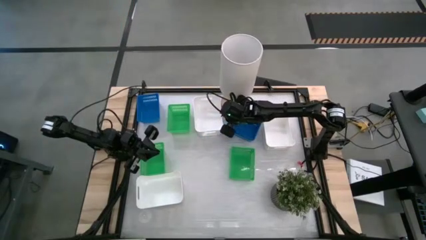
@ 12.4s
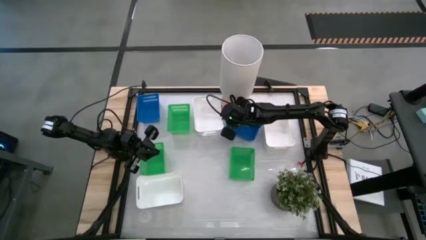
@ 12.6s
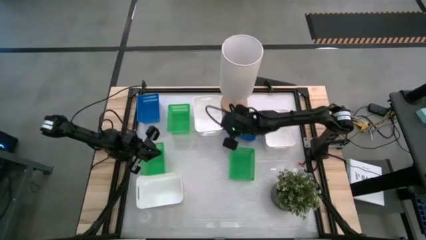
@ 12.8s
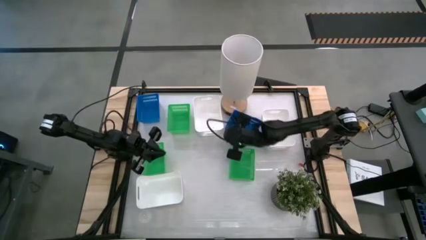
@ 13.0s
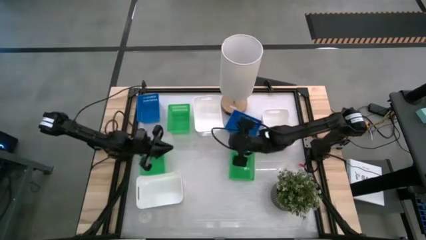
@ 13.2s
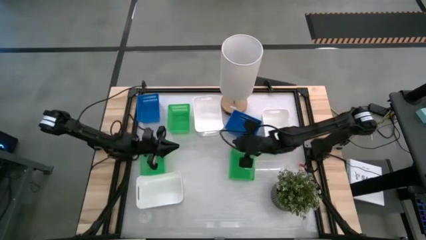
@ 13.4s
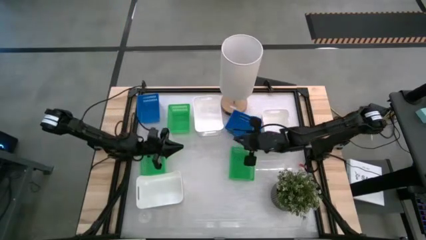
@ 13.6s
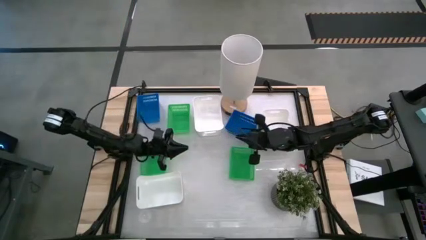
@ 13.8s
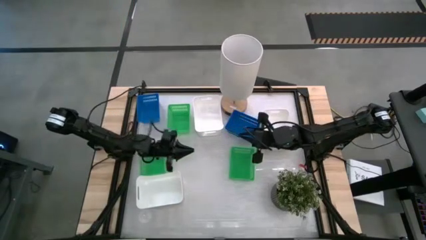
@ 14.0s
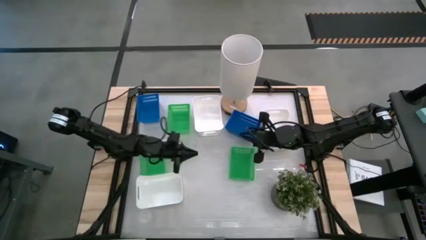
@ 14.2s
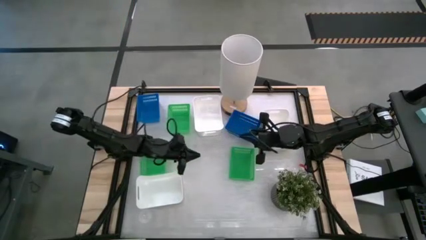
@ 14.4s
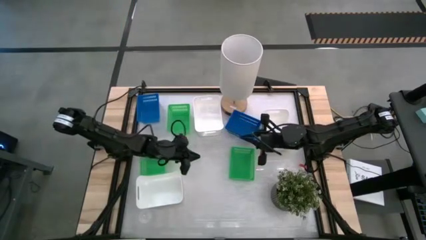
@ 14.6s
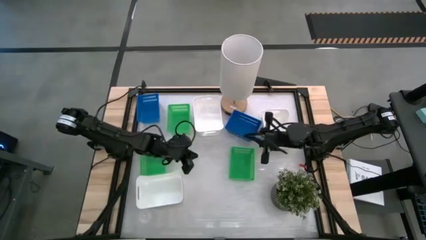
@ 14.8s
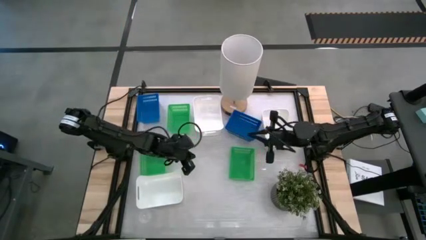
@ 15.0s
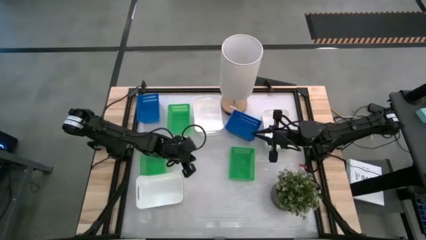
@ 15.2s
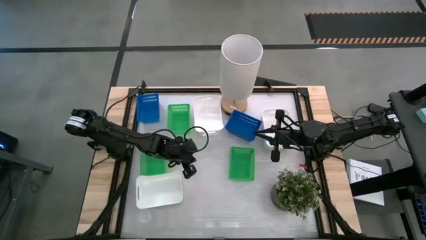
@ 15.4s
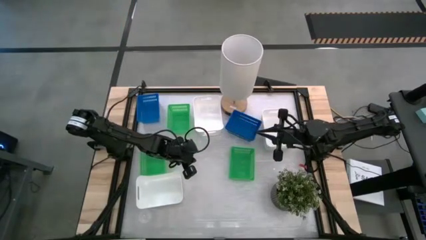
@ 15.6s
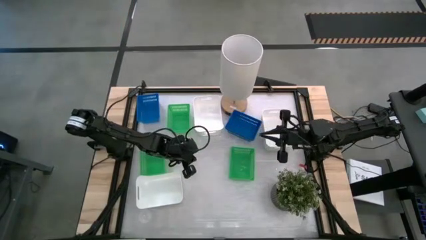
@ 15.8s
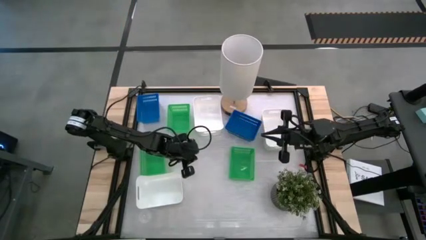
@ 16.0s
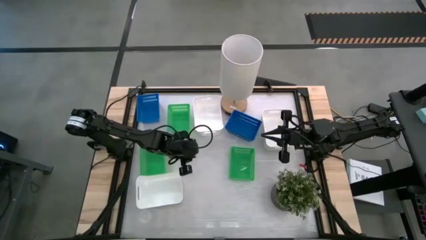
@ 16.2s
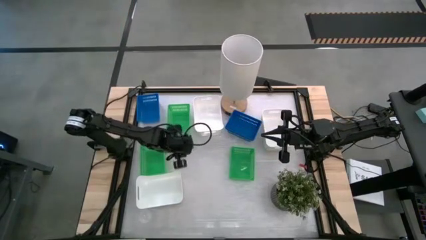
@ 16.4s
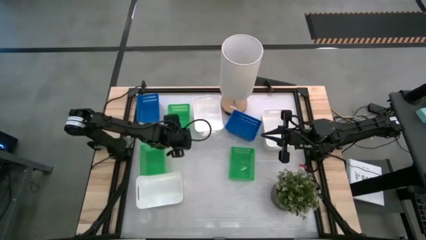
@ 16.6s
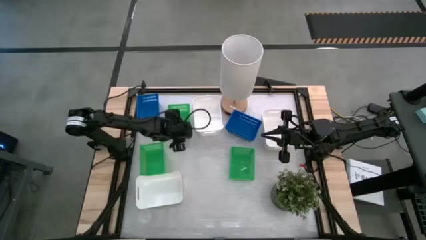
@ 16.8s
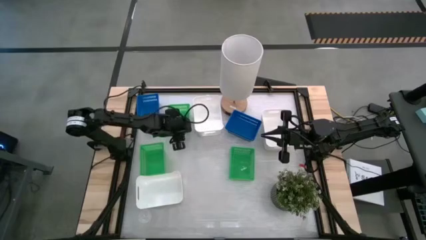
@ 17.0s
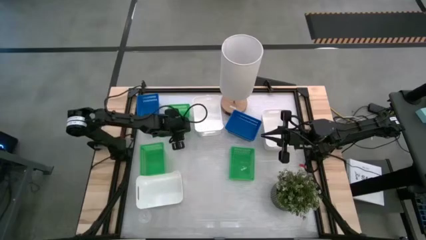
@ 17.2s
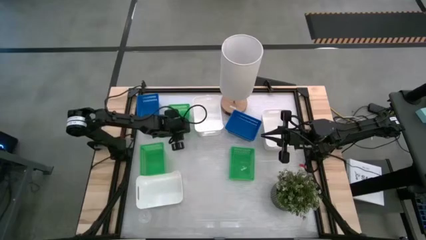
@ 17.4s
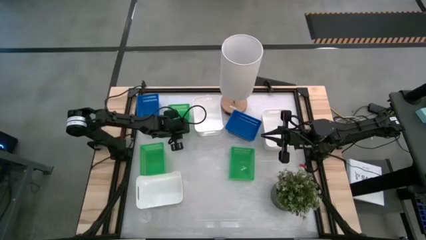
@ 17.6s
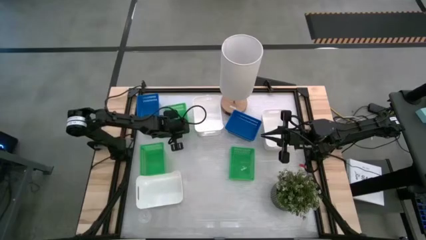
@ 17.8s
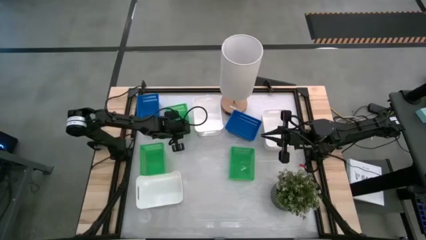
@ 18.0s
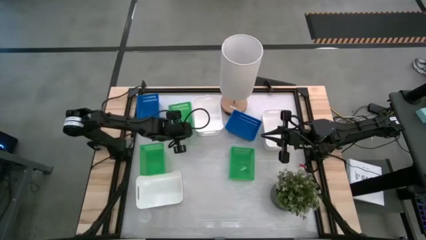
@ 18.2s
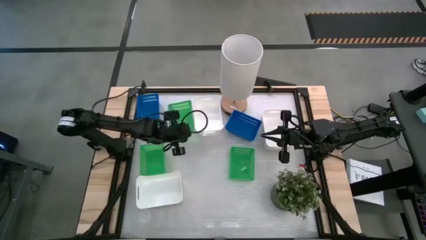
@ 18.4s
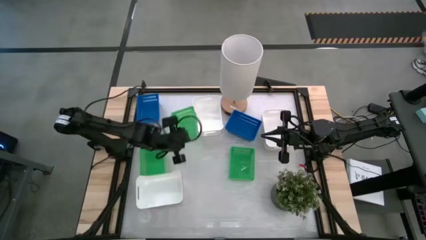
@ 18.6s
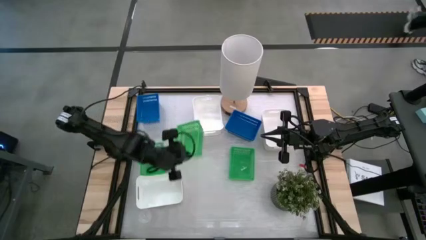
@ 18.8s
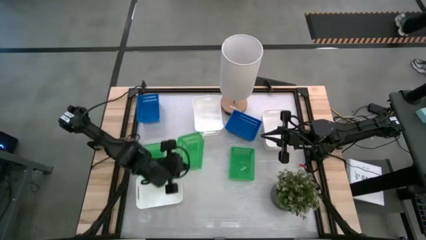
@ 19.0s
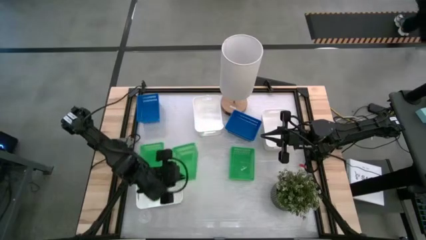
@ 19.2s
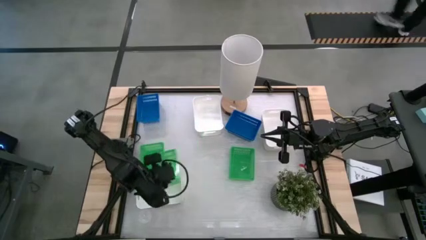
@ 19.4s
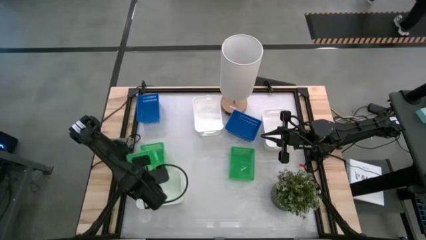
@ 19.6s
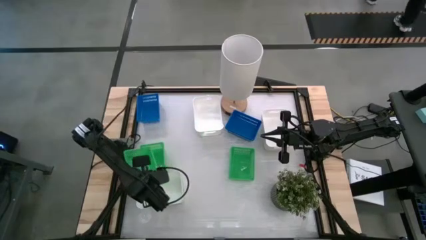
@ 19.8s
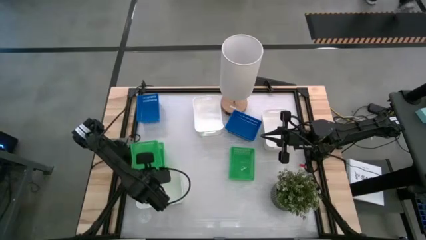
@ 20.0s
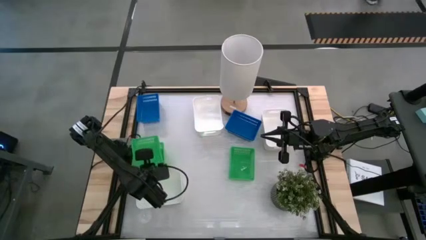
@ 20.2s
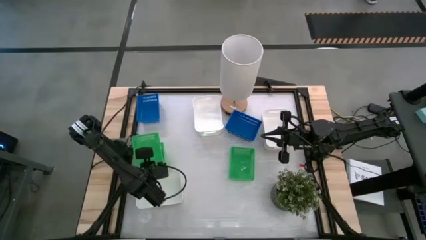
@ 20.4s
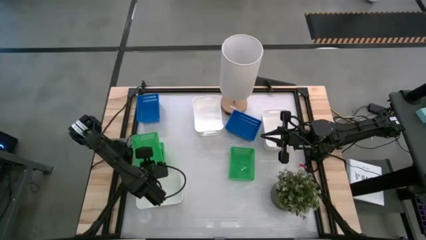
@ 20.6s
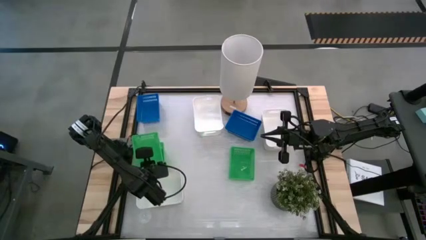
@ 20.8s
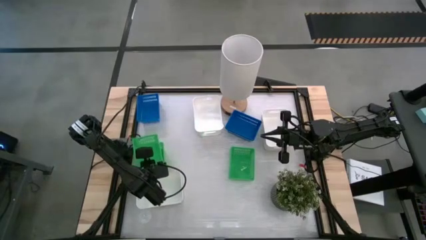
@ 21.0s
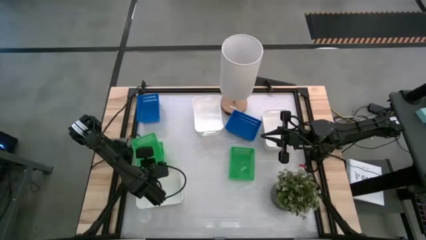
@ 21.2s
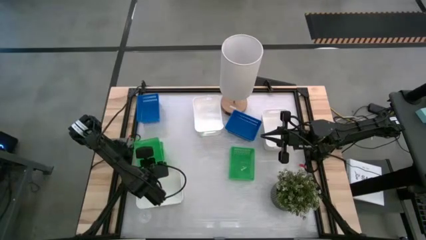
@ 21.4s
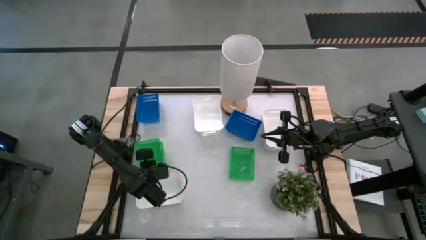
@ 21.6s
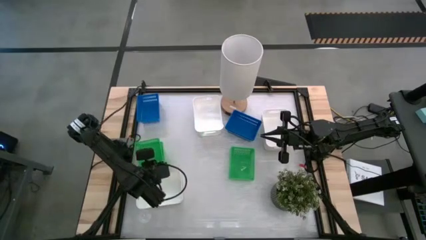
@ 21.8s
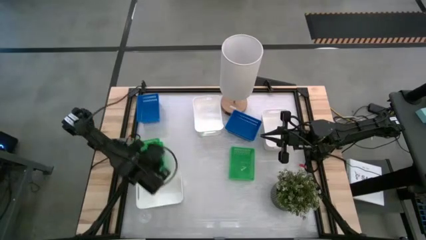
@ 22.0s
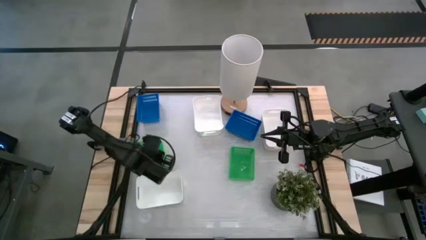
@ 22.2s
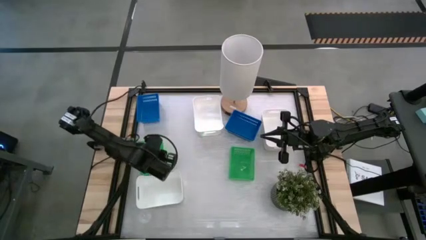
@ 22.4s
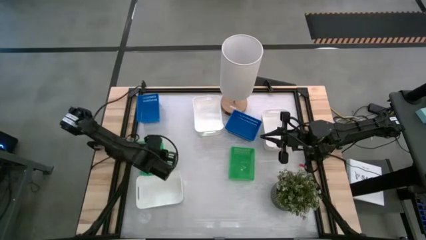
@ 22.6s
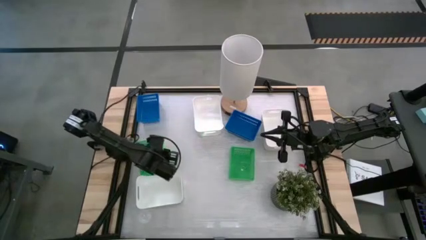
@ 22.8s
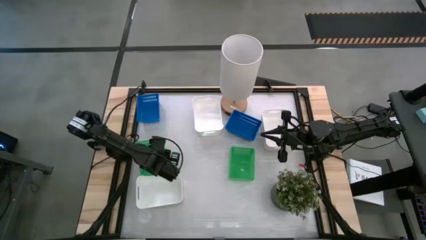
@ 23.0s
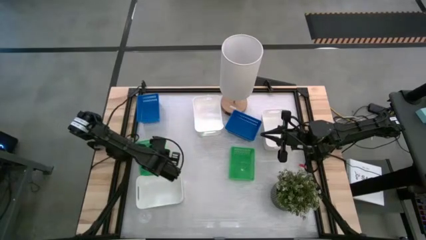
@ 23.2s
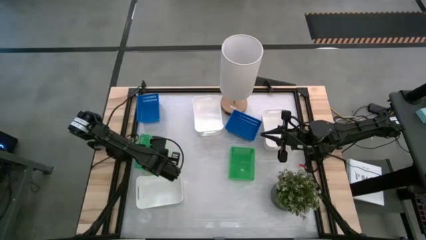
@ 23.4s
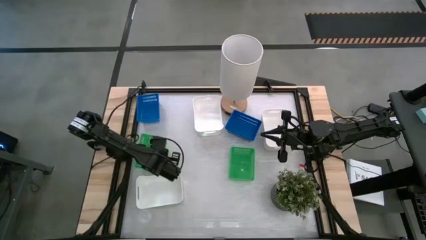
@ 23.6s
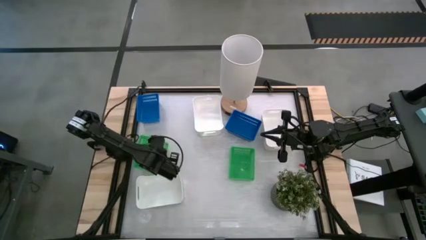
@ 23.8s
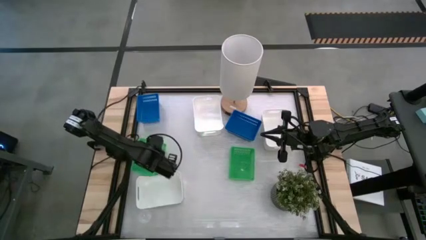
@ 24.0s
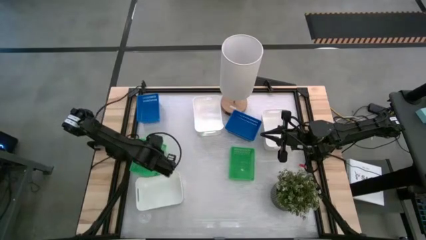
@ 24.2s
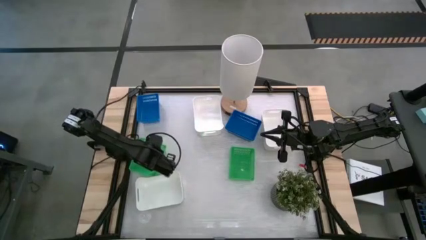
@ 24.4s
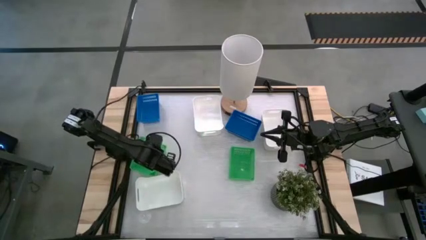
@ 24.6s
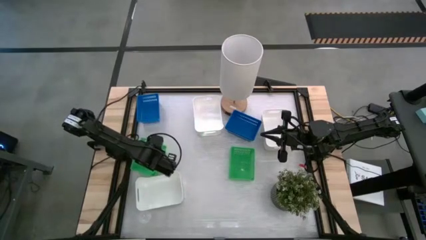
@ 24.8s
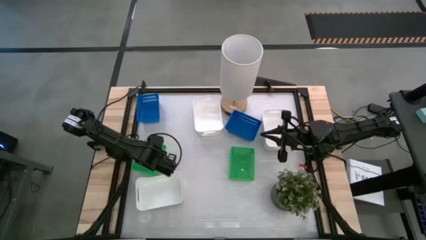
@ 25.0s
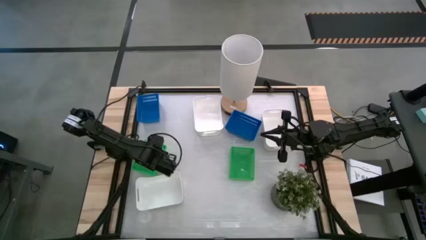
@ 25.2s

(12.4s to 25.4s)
Stack the top green bin on top of the left green bin on the table
